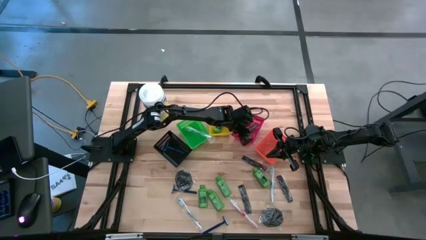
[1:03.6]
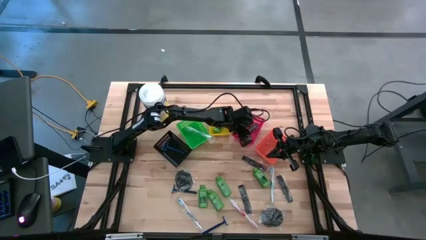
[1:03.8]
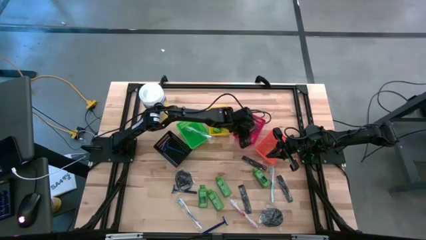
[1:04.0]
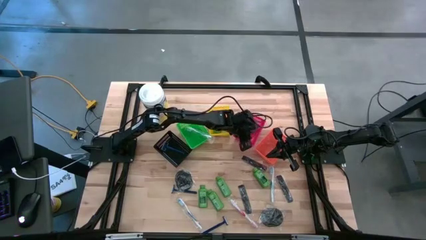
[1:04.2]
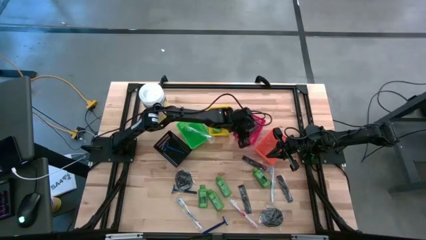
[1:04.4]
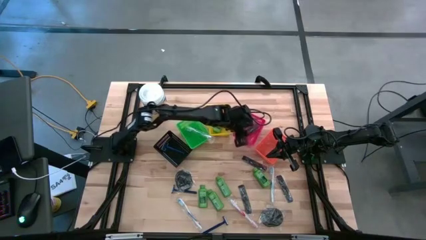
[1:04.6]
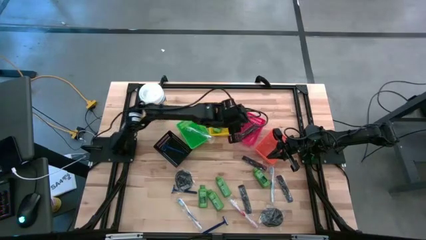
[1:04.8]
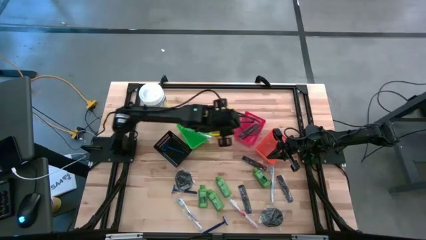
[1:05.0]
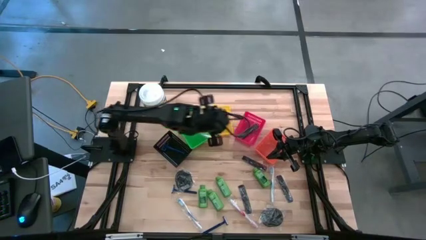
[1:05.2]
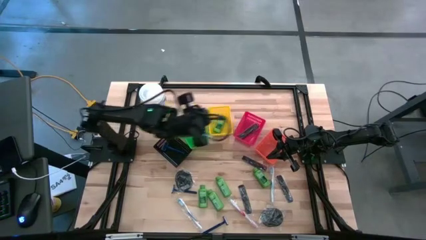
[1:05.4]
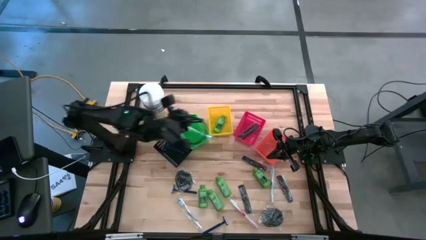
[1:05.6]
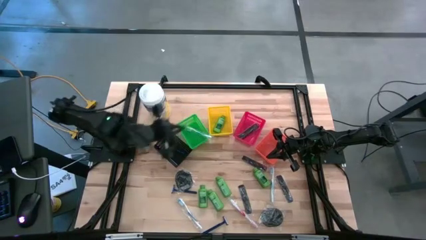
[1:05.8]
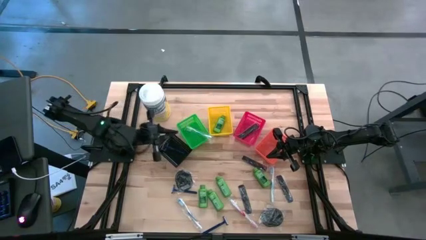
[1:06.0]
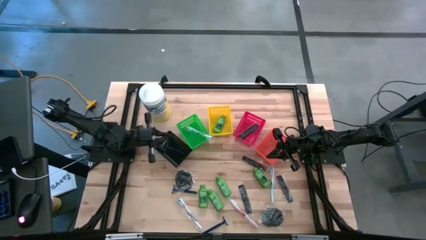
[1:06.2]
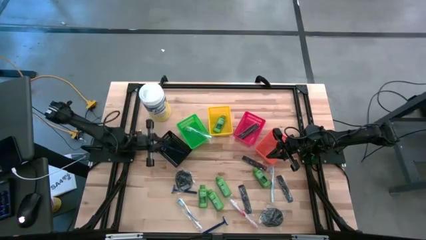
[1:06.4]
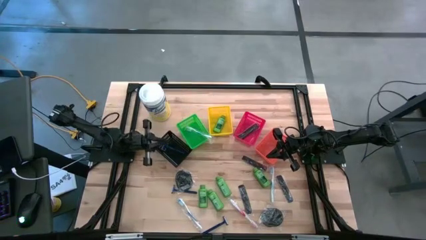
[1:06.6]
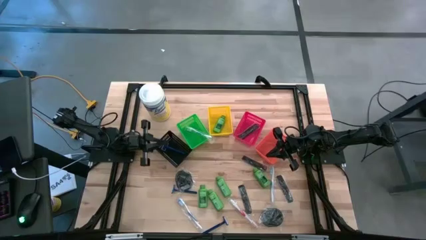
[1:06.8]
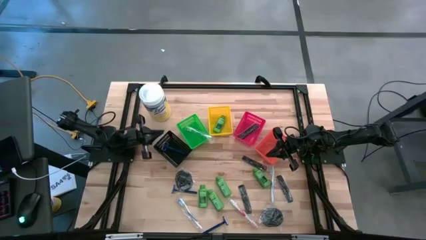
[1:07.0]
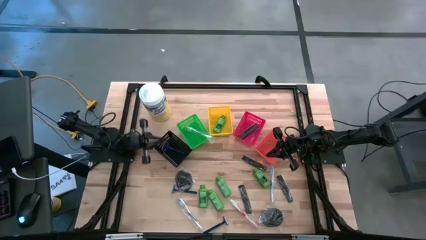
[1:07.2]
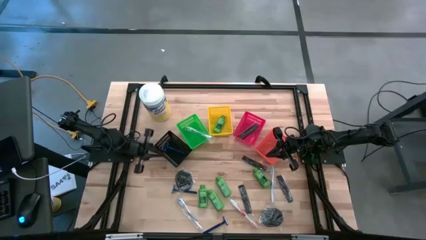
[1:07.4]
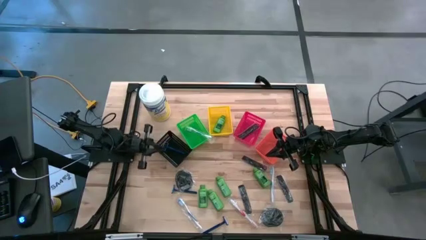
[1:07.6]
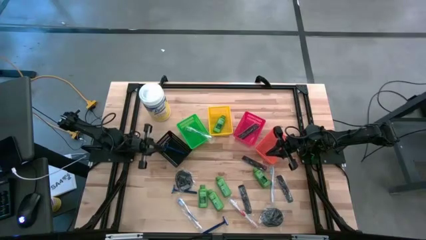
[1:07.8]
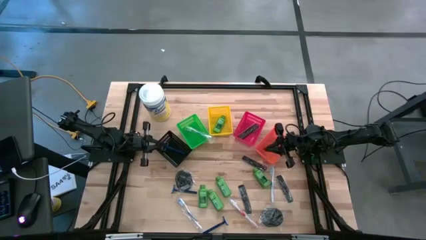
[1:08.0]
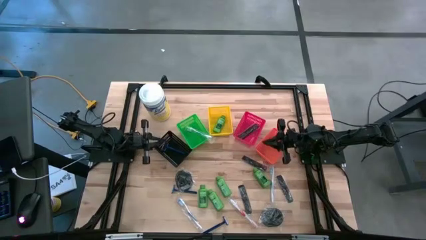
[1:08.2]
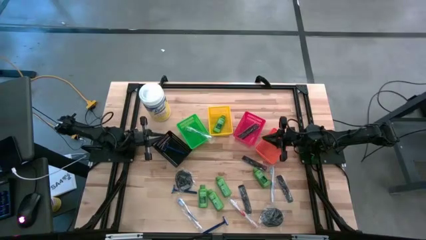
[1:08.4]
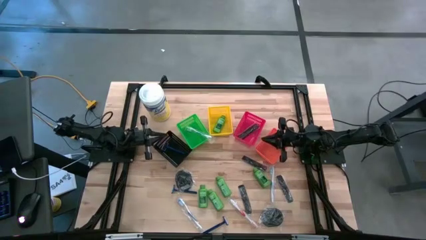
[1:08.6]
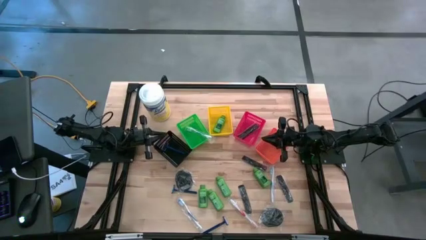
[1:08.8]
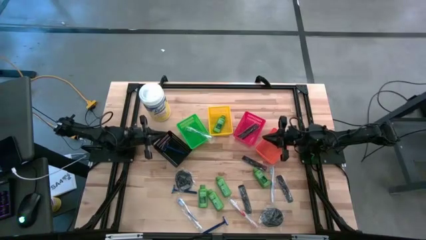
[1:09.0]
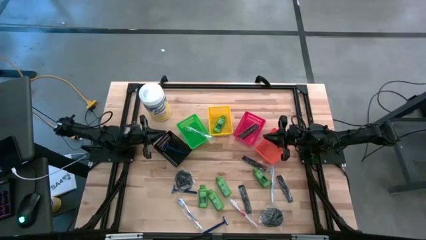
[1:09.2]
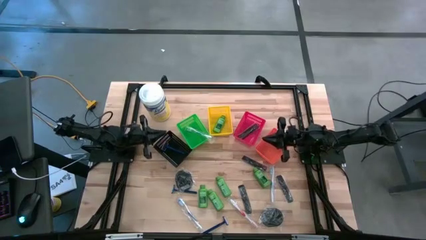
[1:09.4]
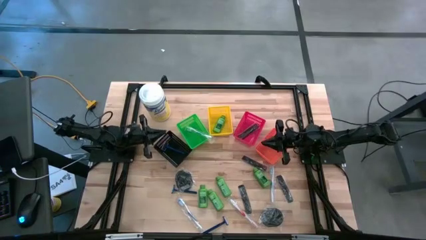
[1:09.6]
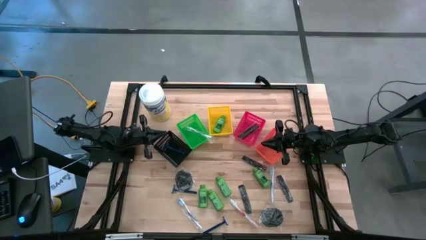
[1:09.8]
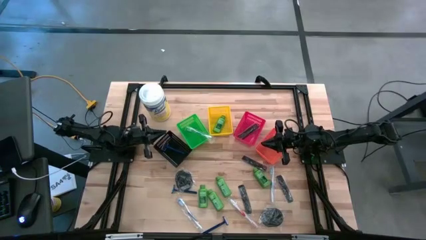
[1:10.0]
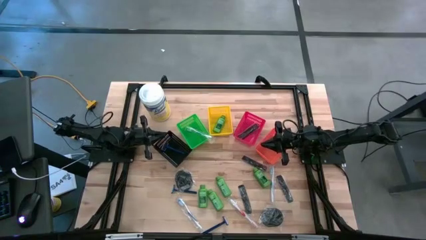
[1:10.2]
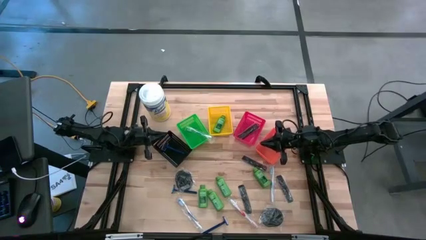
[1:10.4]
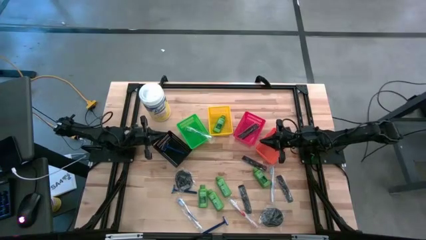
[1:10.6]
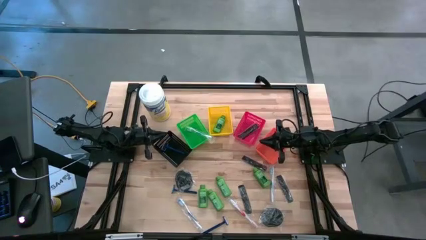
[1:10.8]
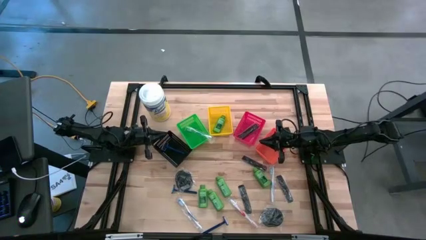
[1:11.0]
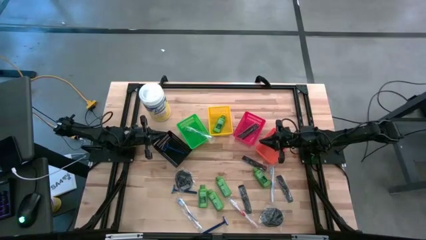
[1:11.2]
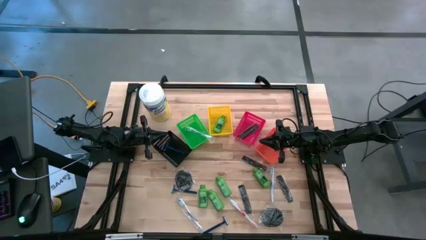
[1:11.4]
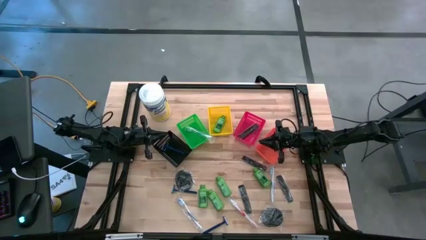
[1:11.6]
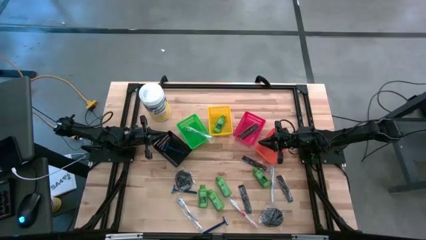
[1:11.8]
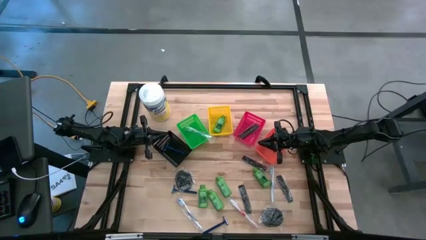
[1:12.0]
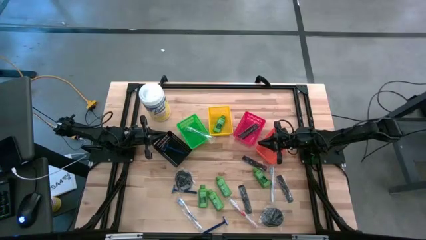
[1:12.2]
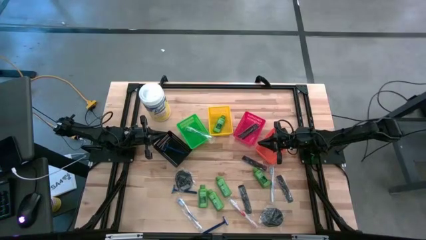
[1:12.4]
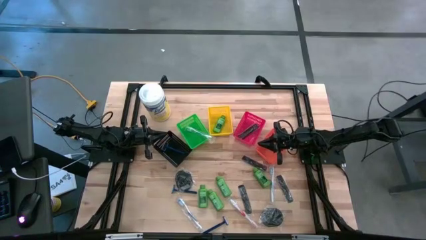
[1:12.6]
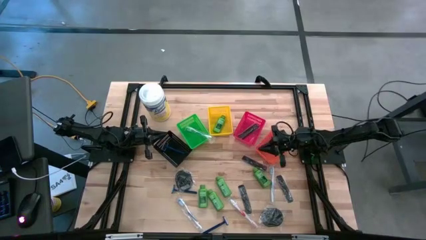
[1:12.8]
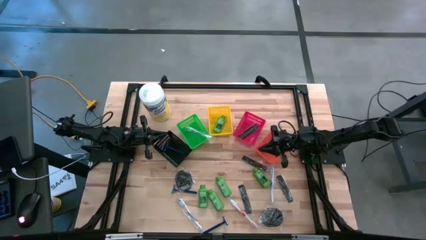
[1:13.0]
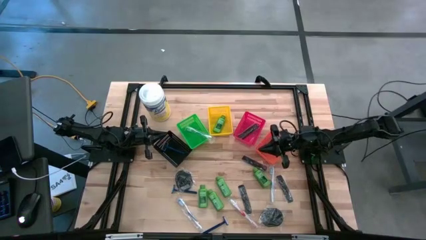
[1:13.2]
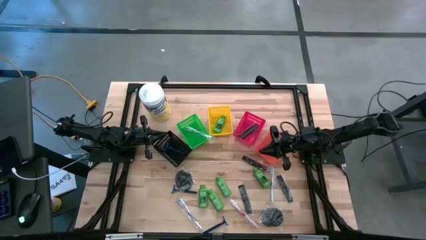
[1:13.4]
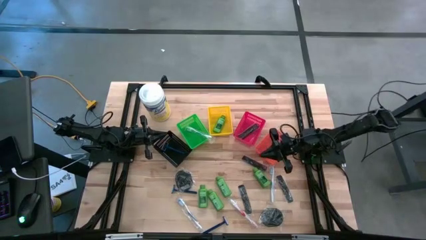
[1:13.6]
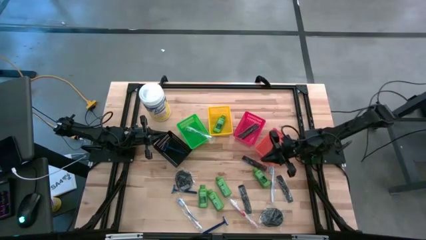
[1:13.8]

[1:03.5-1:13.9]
Task: Pick & Place Travel size toiletries
Put the black hairbrush into the orange bin

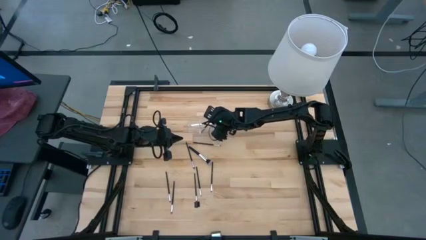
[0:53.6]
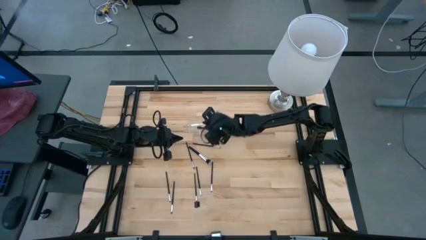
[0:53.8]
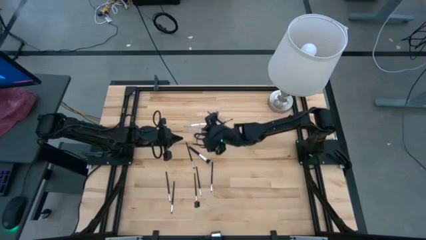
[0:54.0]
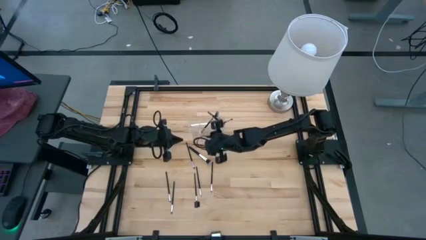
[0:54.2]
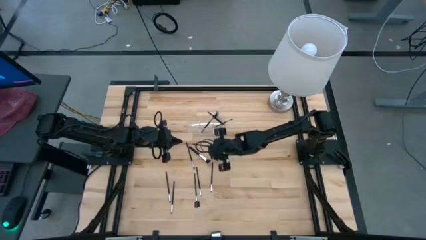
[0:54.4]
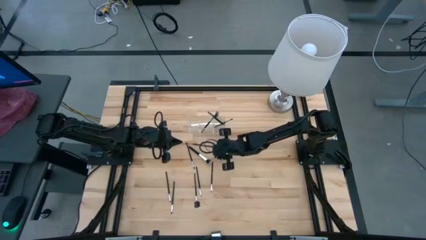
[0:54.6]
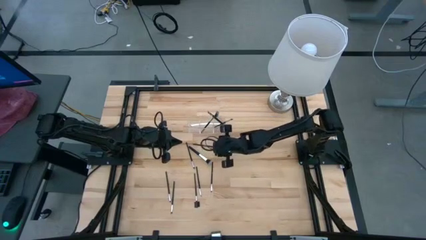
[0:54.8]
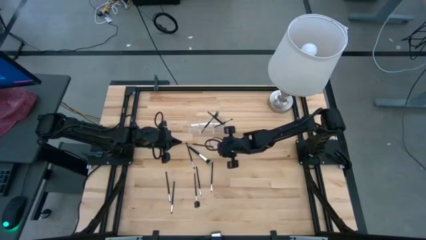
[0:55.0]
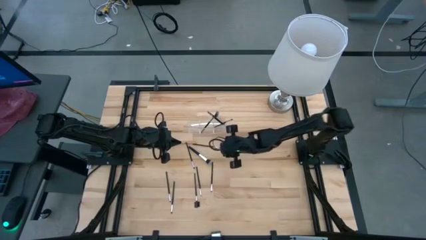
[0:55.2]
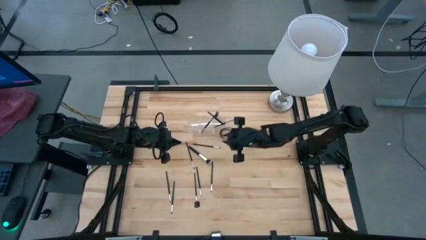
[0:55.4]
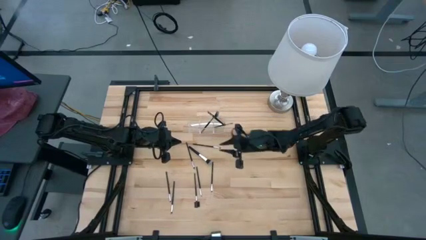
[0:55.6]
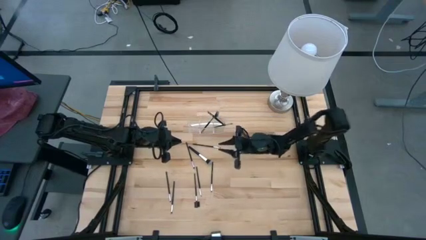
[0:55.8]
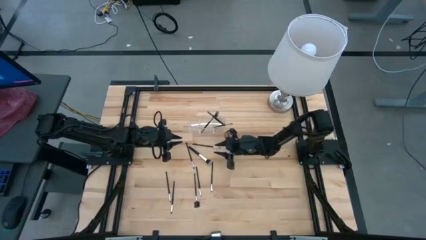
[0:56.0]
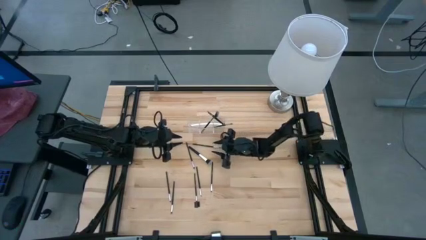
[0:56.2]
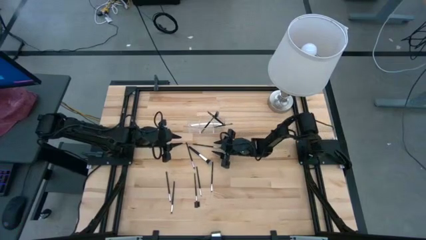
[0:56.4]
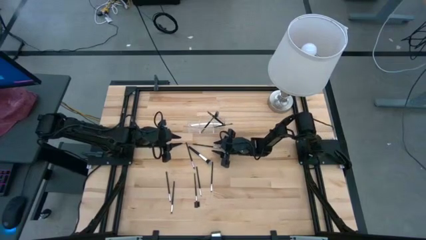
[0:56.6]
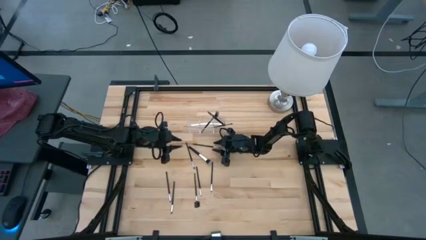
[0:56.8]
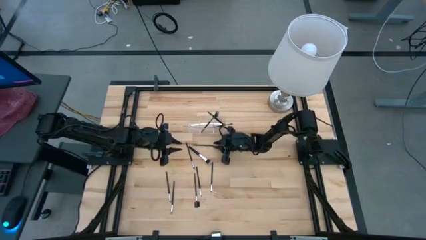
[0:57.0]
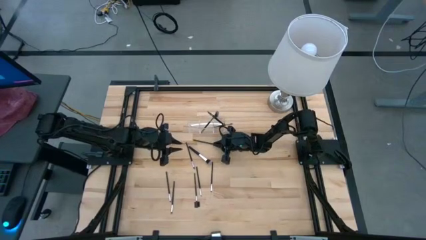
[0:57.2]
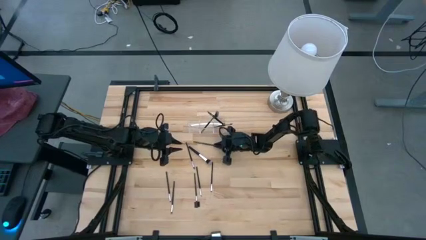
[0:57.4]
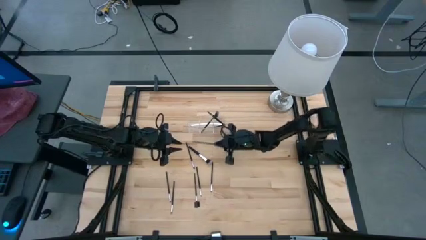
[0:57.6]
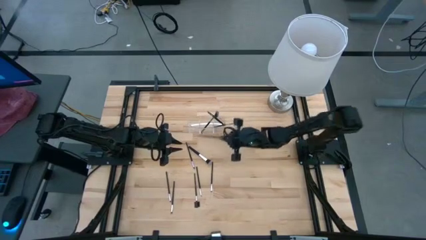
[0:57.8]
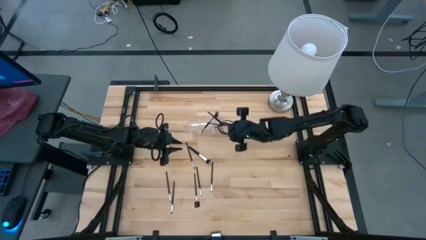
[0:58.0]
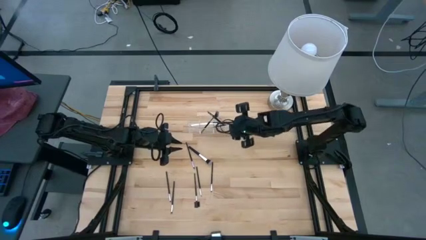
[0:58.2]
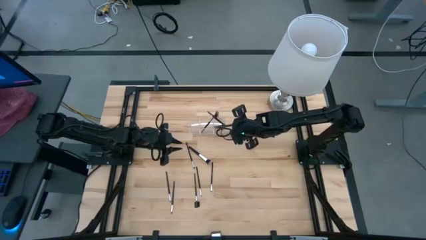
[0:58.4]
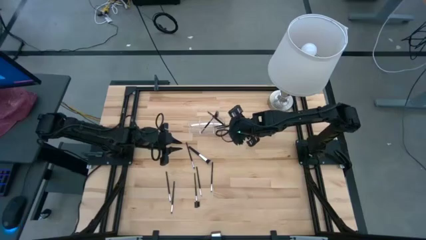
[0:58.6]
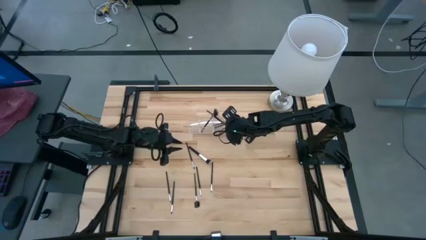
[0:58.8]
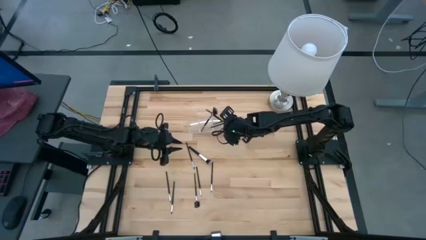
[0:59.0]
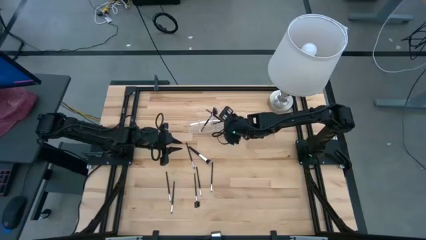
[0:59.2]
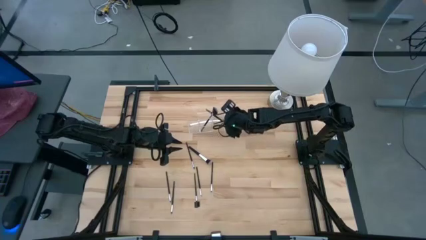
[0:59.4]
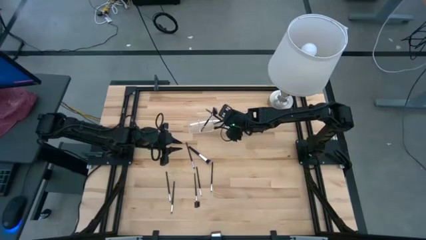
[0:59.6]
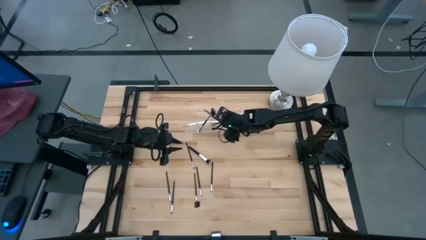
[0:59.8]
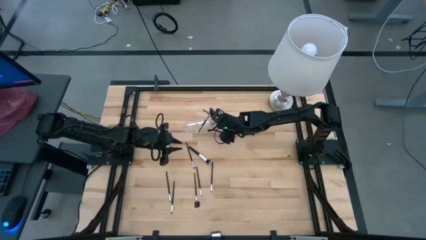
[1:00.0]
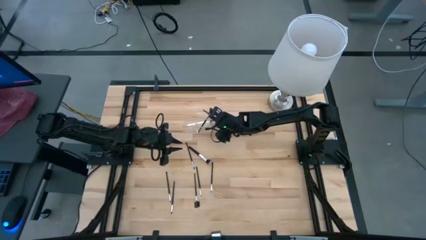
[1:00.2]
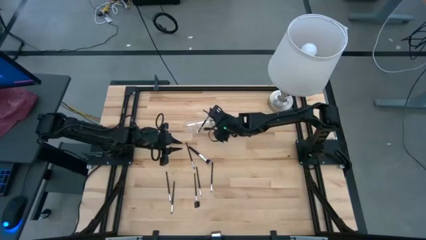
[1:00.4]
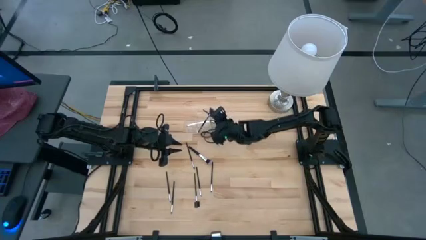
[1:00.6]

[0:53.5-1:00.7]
Task: Put items in baskets/containers
Put the black eyeshadow brush into the transparent organizer
